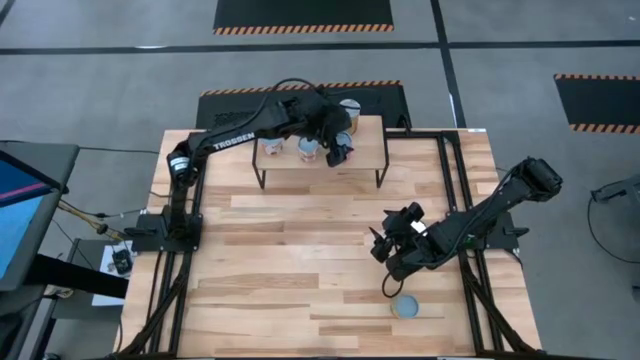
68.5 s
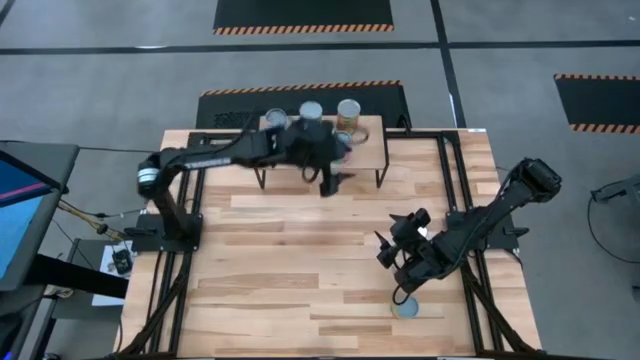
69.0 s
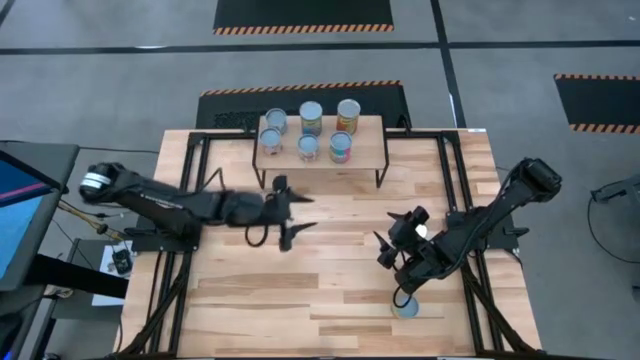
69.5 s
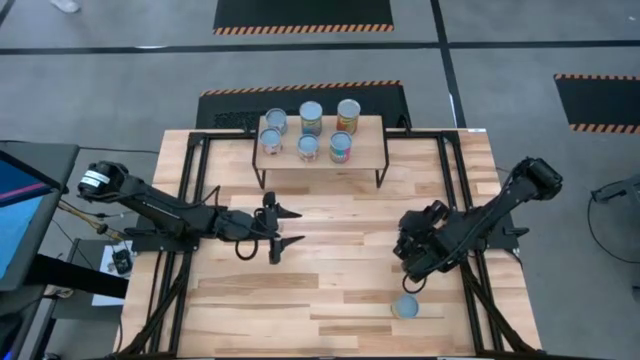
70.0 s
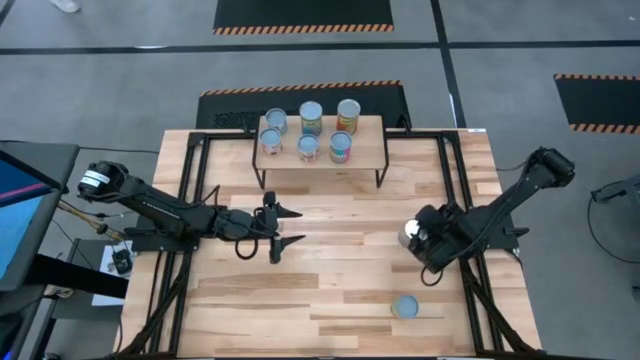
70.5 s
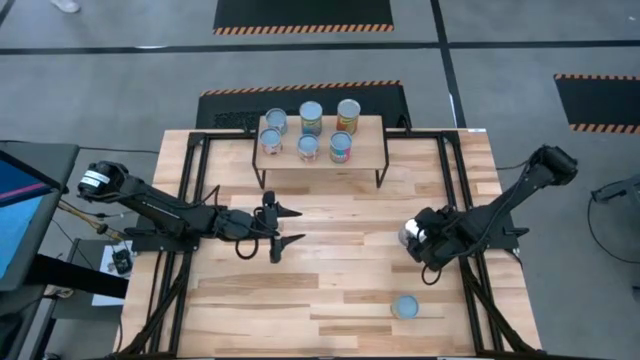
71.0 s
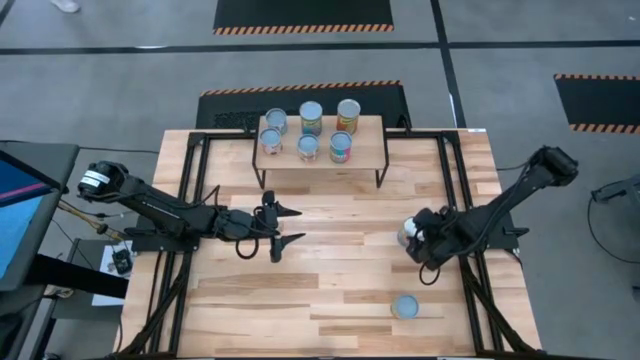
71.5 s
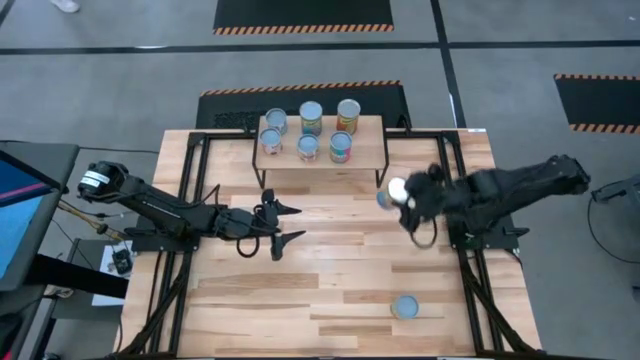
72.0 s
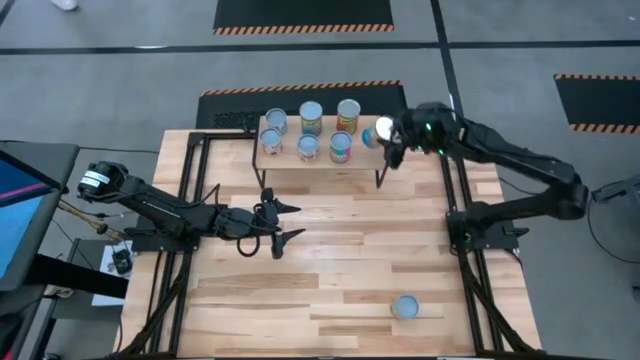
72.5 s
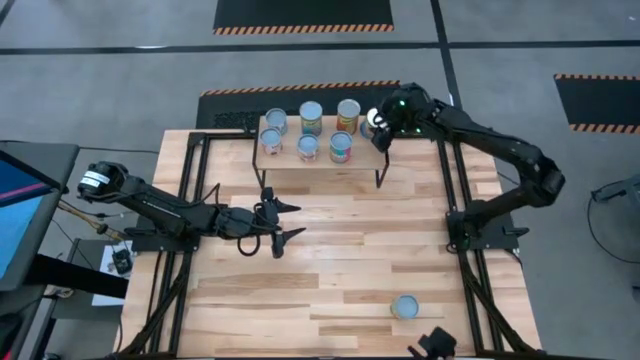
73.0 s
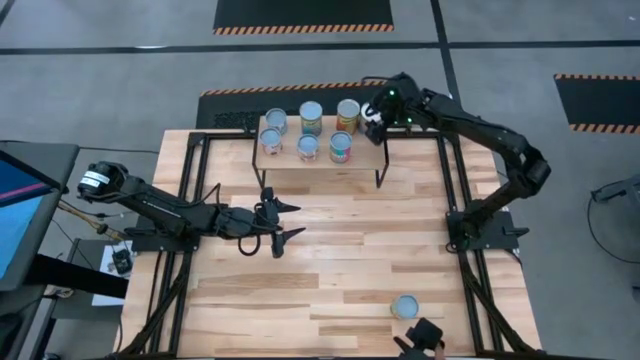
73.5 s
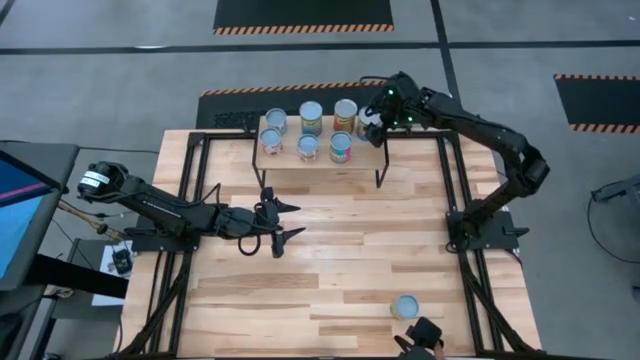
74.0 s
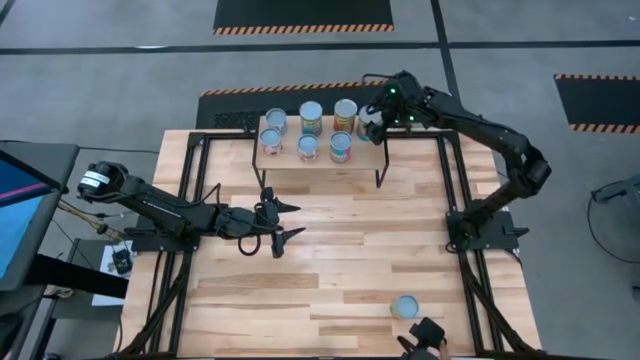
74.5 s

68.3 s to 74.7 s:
Task: Pick and place cans onto a shelf
Put the canned tomatoes on the shelf

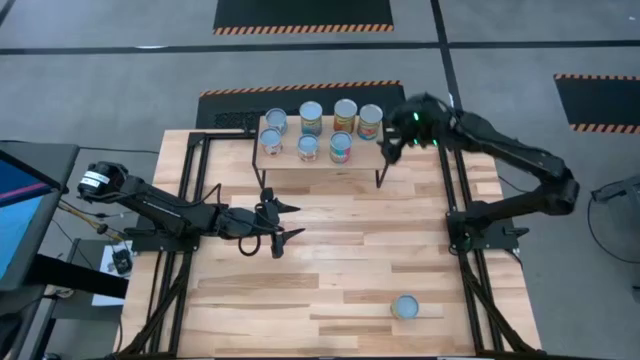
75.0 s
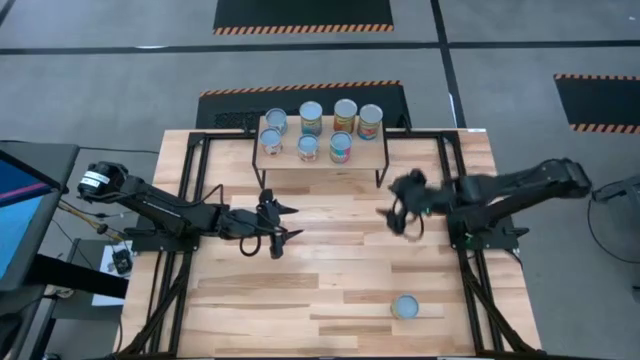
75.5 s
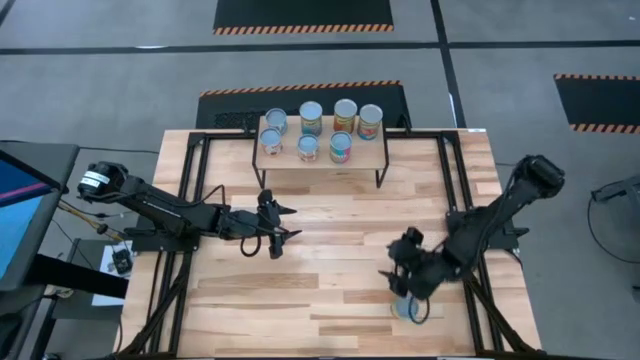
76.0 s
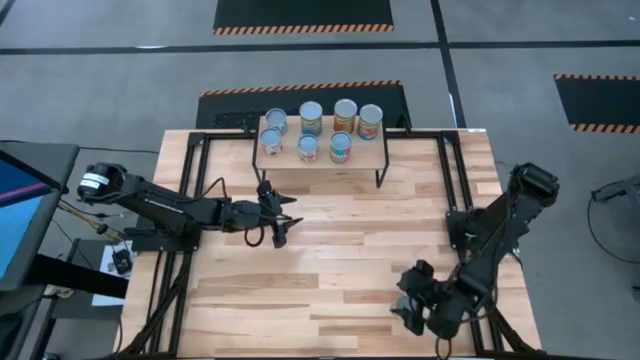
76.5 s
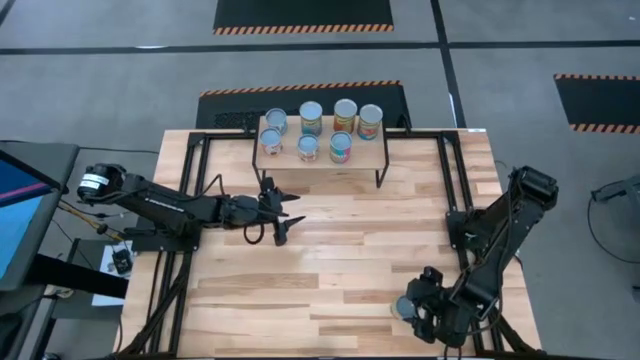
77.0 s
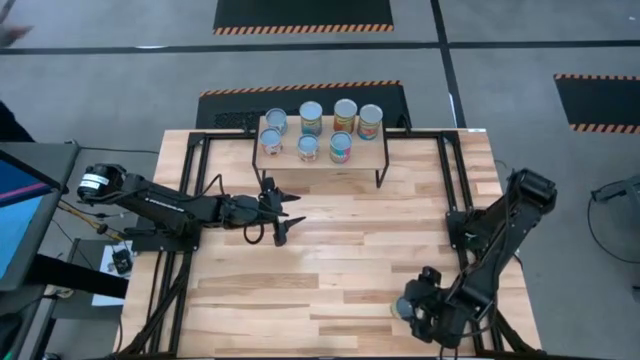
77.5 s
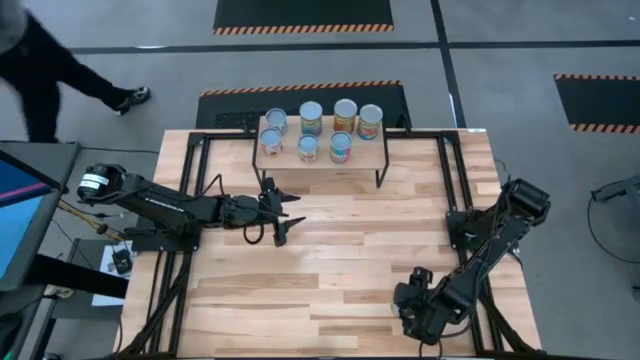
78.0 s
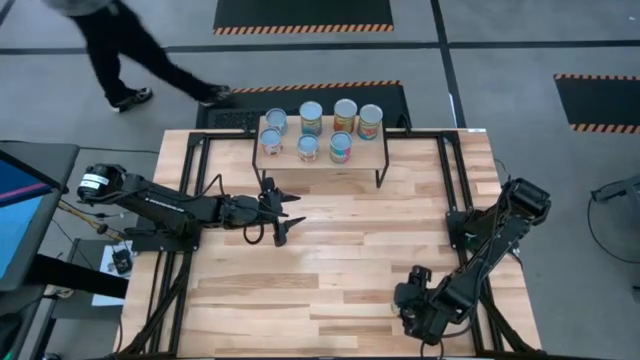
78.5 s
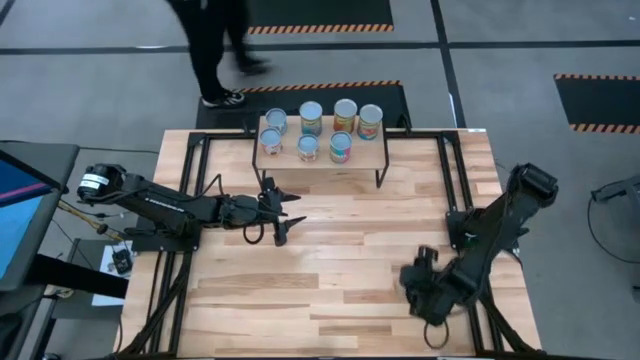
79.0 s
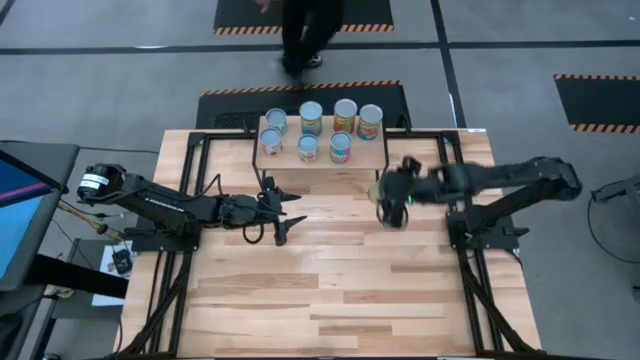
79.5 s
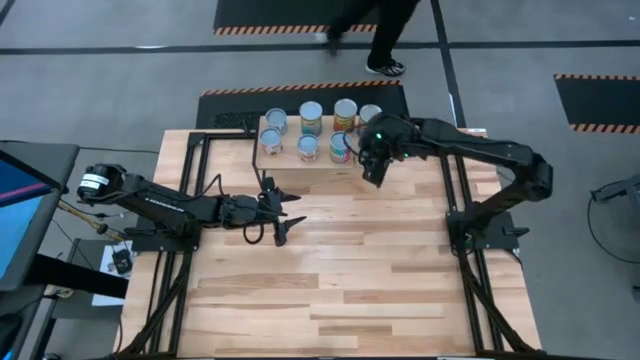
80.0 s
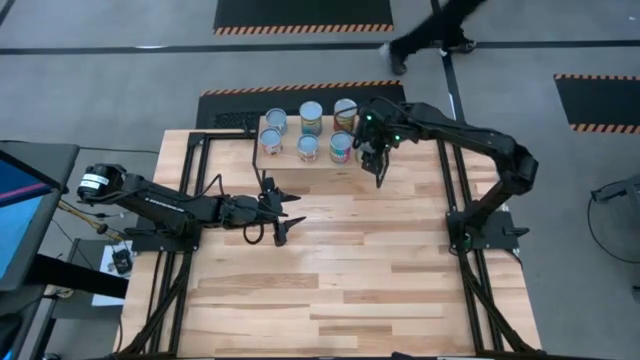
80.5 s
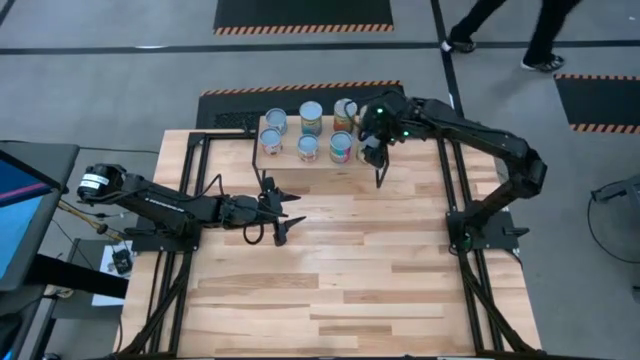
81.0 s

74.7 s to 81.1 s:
Put the canned spaghetti sauce on the shelf

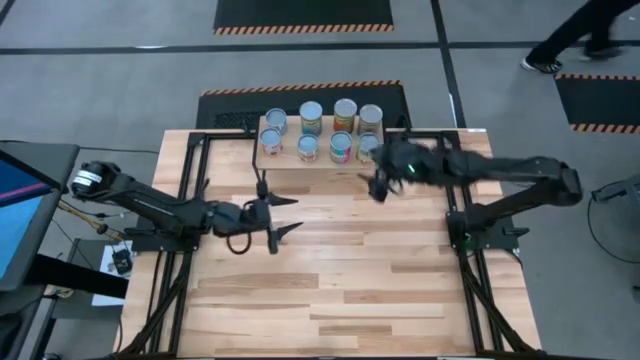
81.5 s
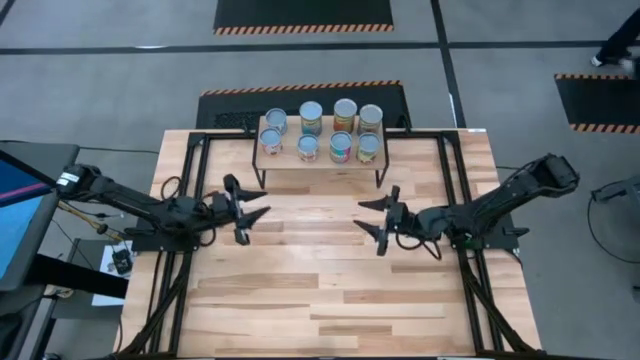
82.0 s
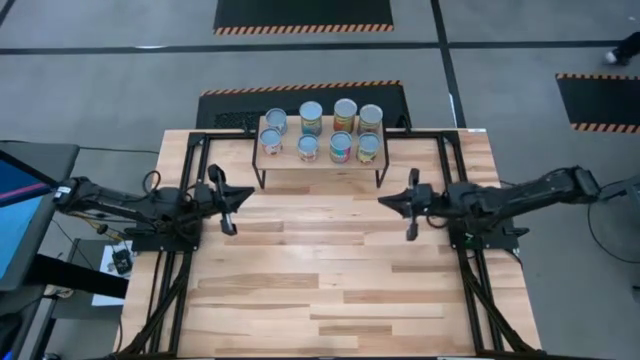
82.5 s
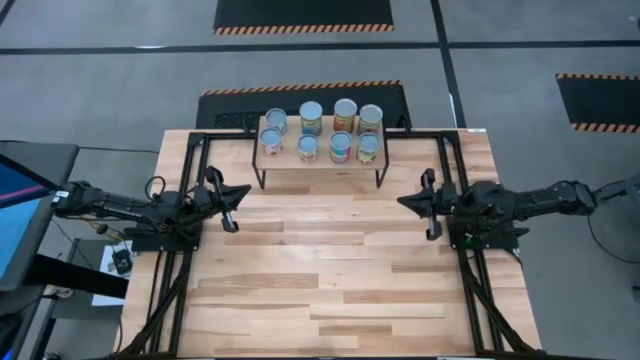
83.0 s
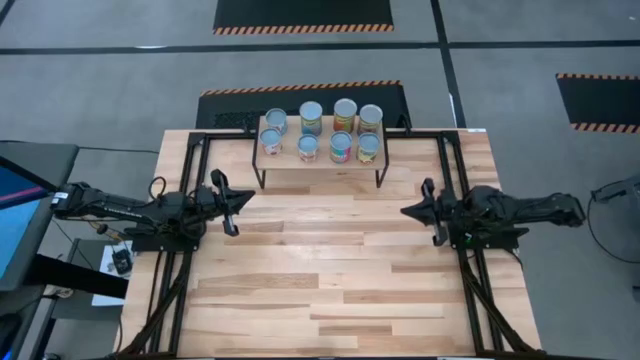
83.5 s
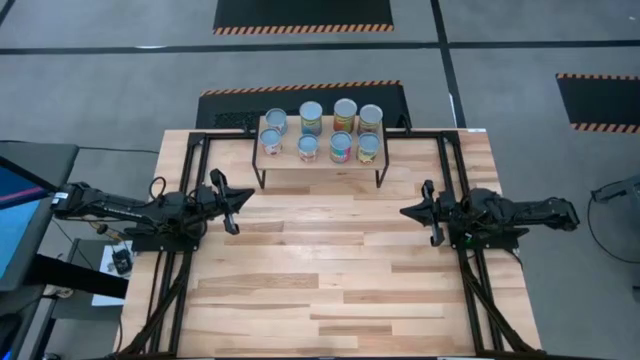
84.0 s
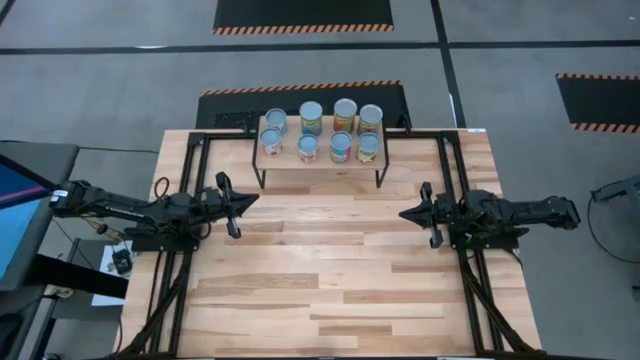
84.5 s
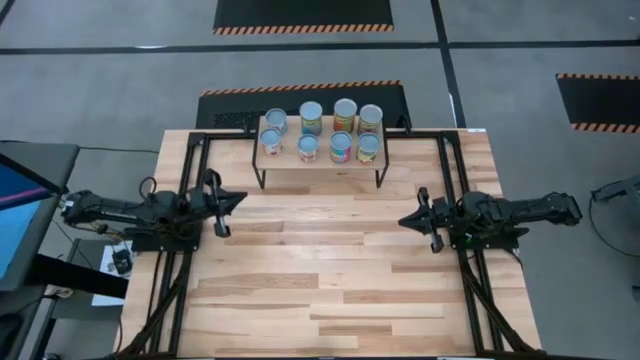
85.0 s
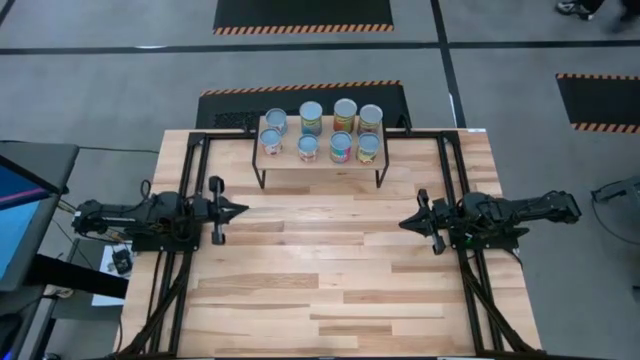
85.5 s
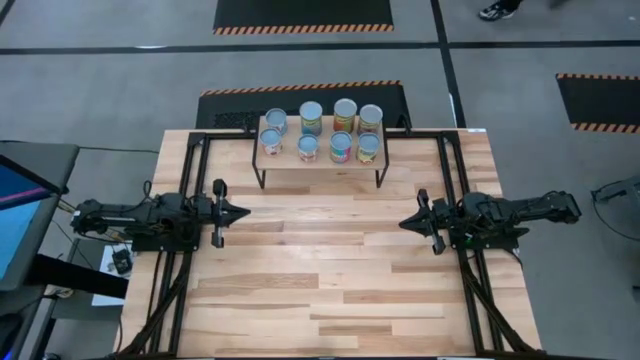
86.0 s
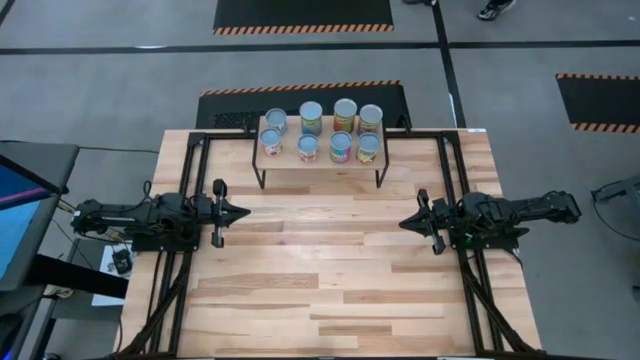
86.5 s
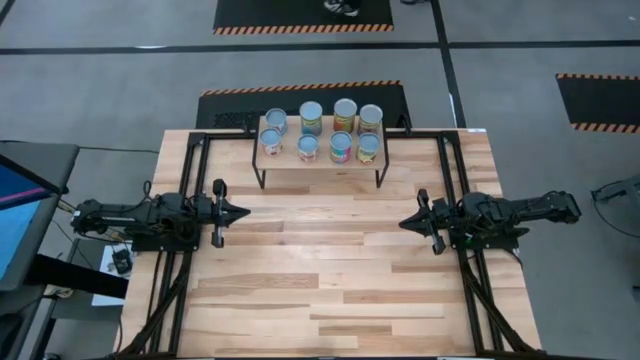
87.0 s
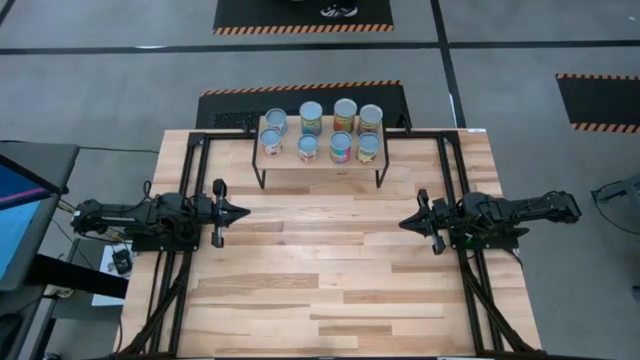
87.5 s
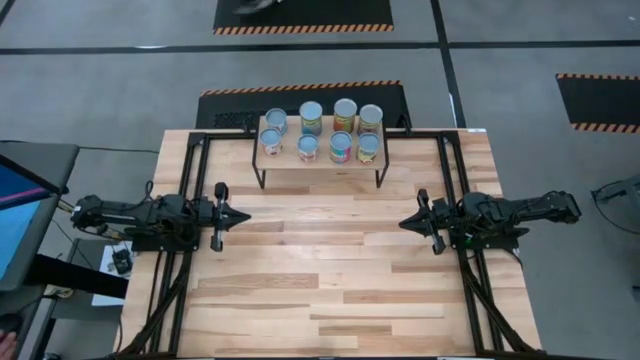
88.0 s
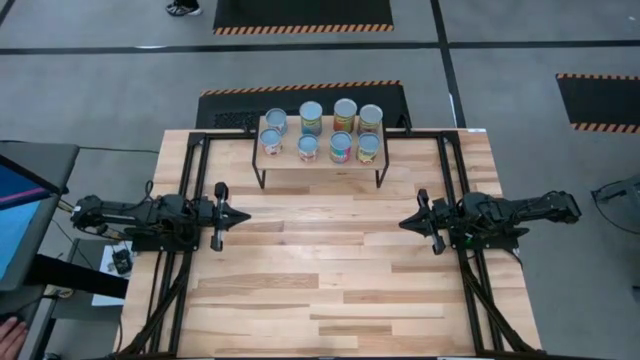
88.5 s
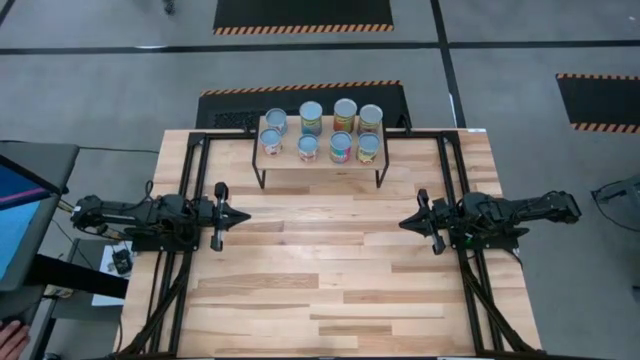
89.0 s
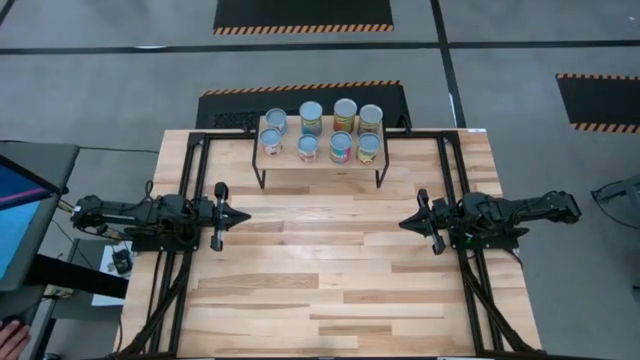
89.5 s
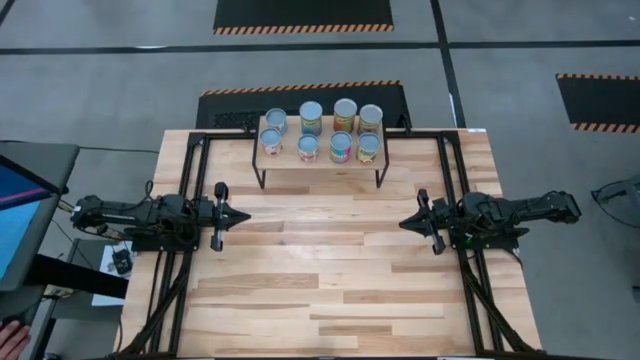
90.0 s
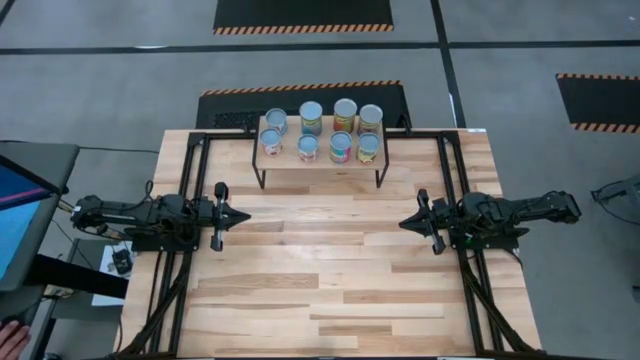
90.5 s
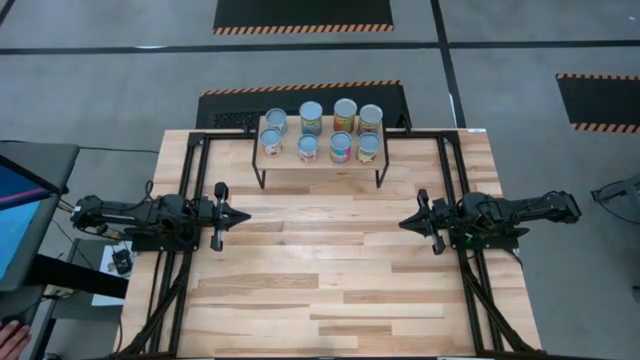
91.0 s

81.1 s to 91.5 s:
Return to Home Position
